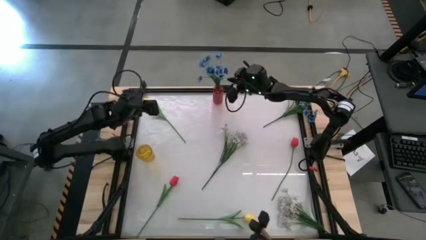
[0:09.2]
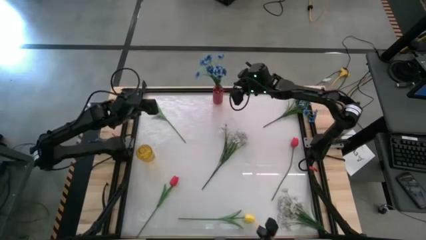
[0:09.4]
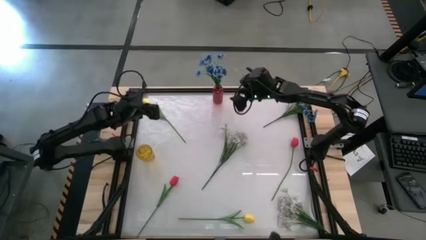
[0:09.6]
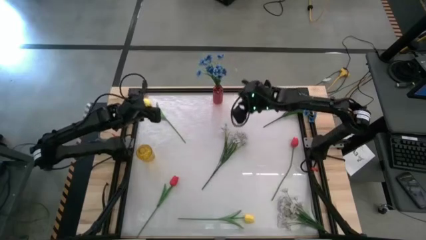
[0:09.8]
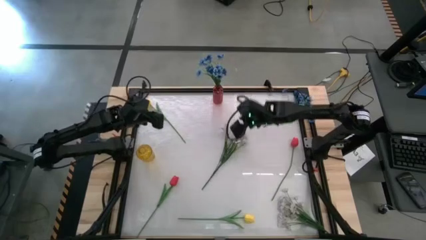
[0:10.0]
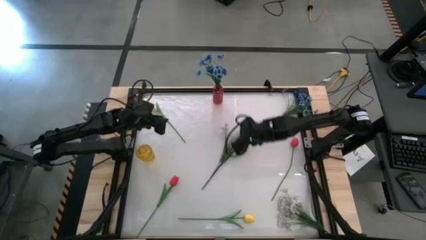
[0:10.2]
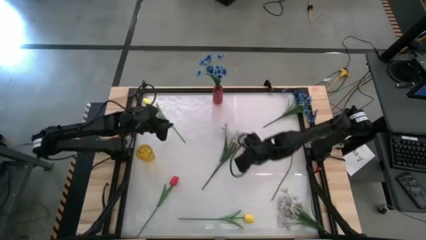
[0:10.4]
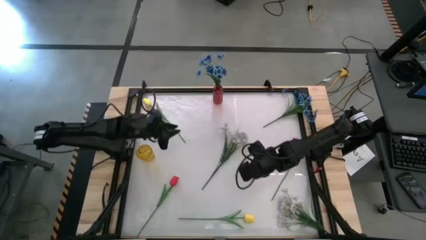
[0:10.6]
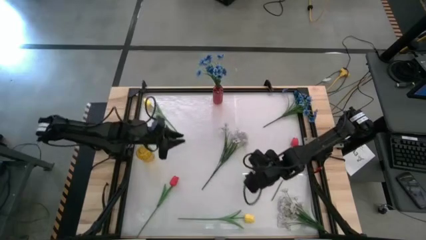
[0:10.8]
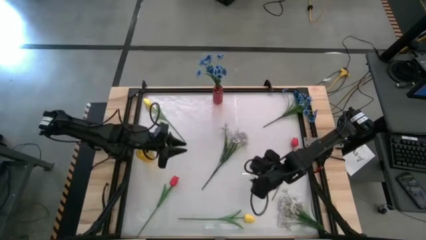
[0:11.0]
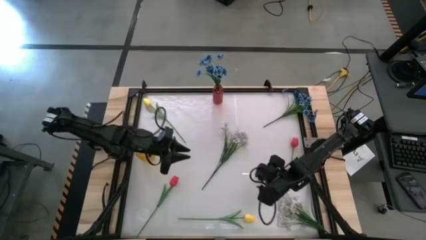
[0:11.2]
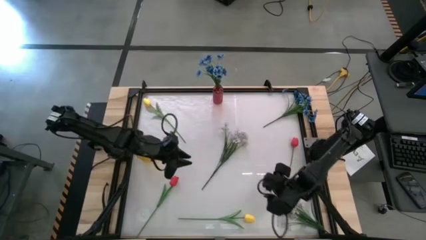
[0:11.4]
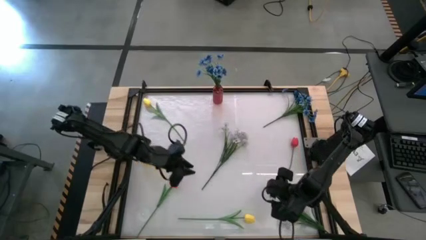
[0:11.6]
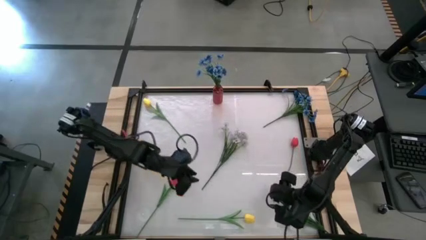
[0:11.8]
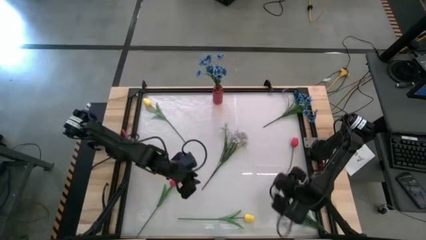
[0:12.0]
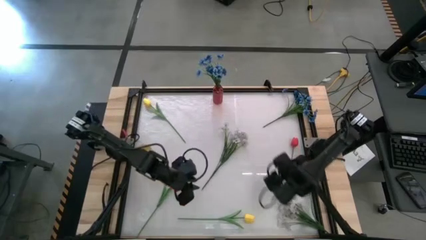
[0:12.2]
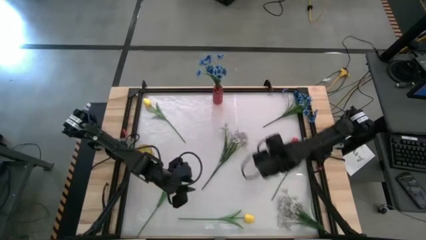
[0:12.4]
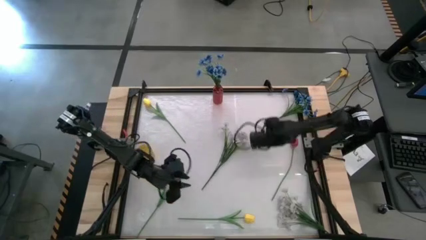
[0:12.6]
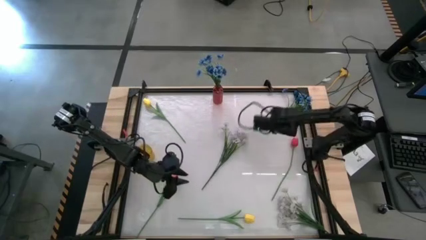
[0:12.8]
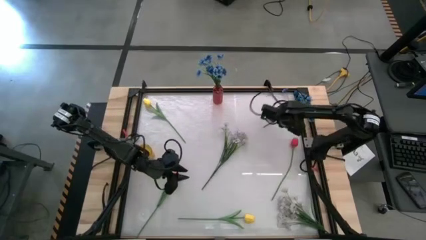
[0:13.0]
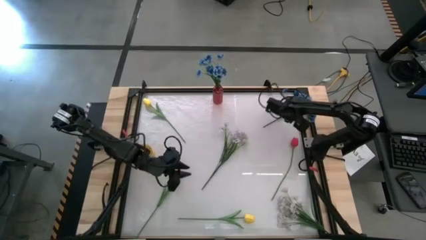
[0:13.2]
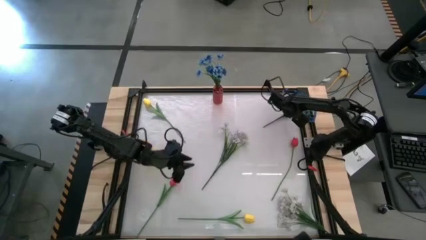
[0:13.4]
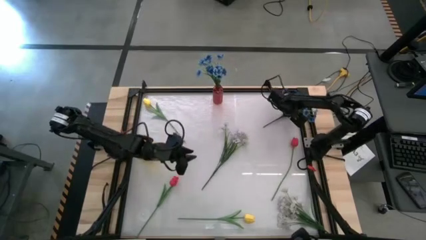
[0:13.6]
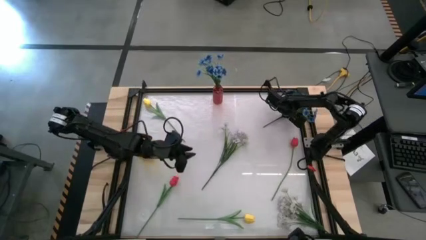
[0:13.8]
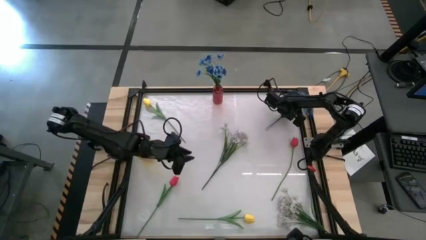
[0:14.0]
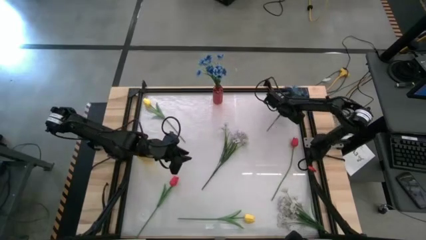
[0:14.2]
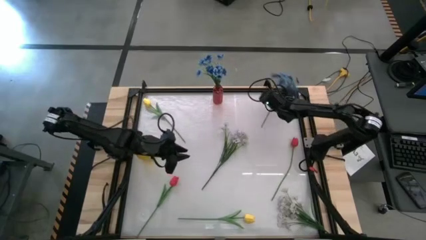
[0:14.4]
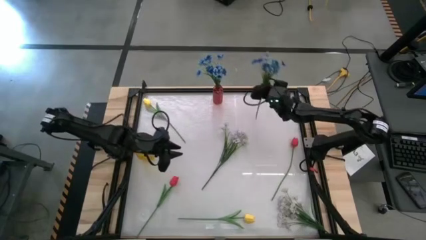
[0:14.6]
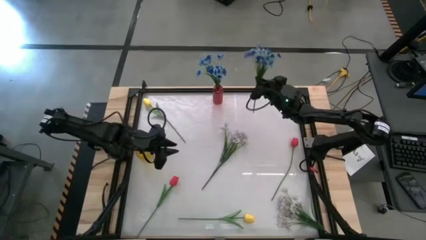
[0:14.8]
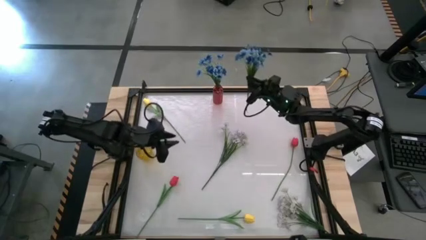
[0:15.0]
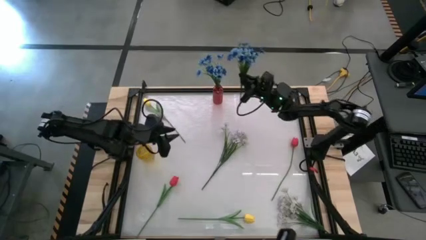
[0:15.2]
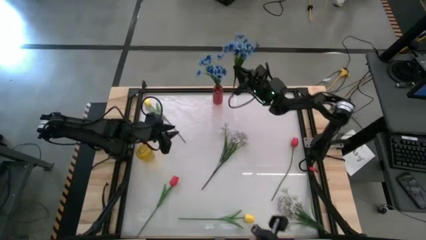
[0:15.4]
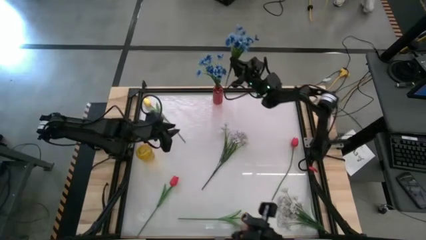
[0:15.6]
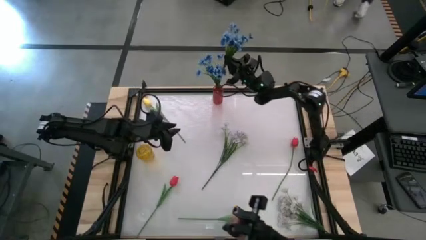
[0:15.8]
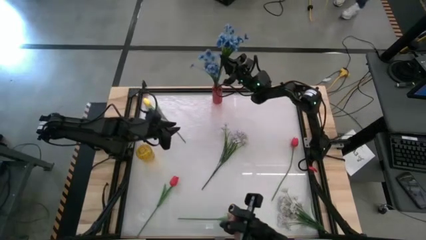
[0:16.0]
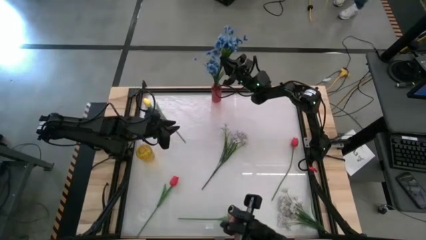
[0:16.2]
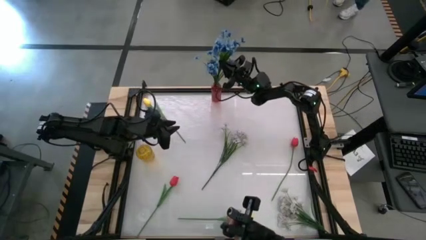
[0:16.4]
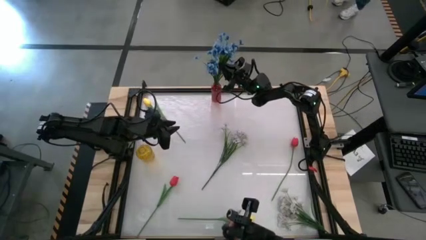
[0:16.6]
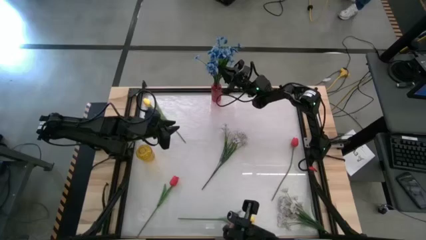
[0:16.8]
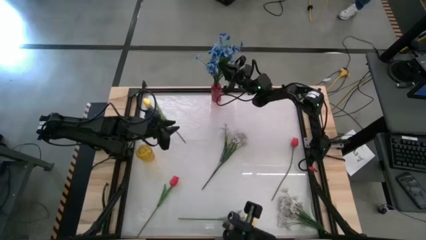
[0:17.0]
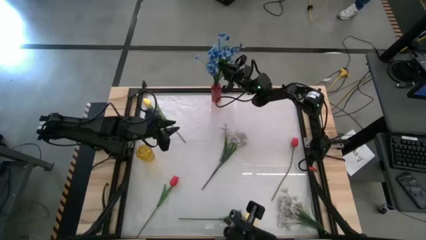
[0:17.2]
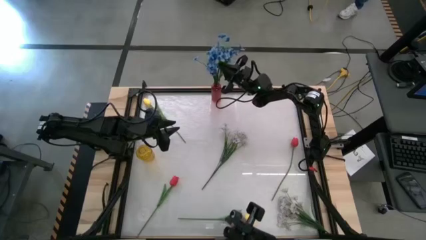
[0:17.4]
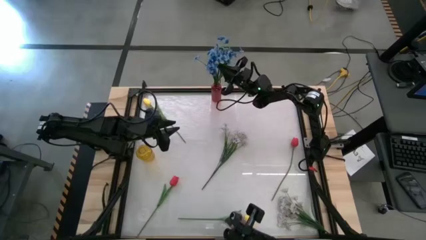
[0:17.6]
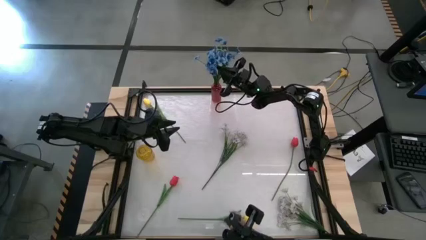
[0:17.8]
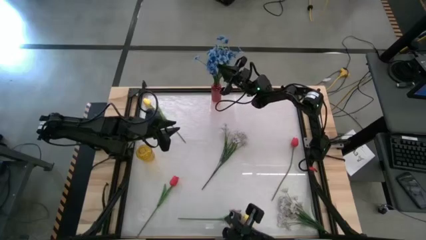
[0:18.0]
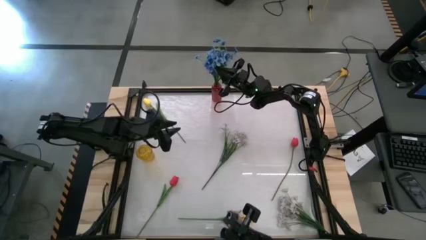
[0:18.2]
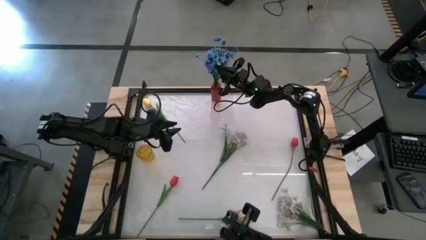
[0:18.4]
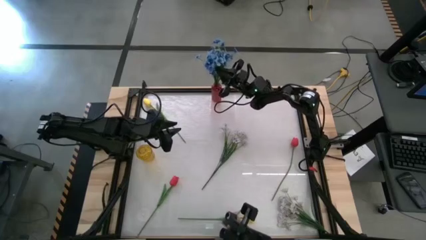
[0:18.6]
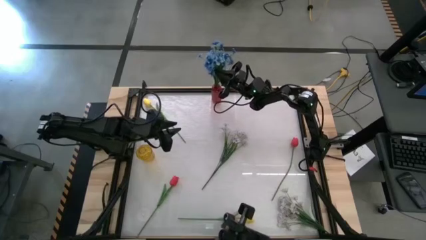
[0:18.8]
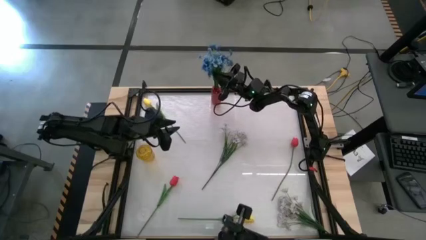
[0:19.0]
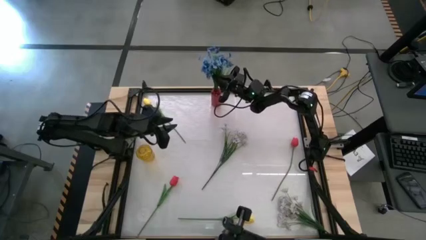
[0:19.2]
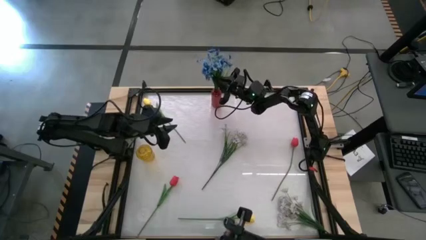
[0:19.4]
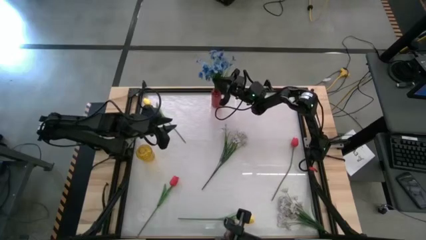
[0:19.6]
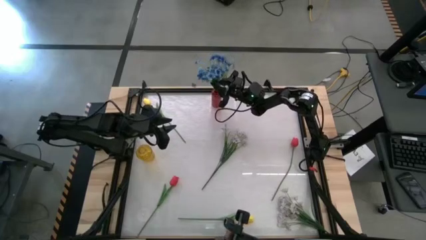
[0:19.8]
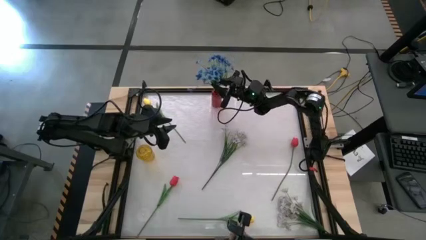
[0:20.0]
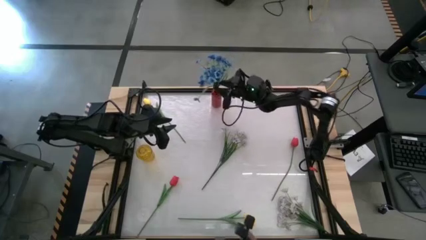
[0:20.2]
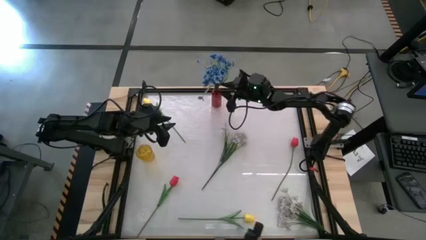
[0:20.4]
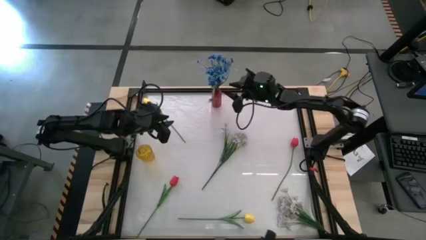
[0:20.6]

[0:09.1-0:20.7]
Task: Sort flowers into vase by color
Put the blue flowers into the red flower vase
